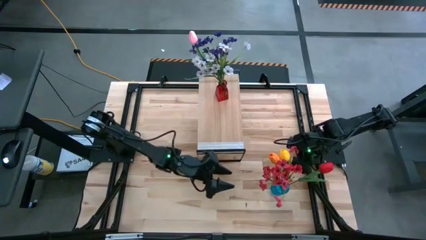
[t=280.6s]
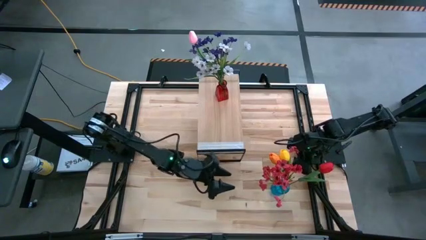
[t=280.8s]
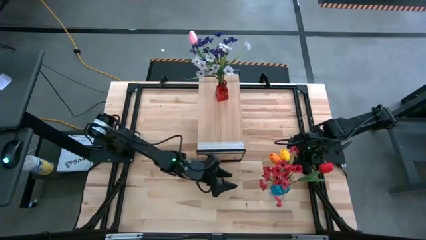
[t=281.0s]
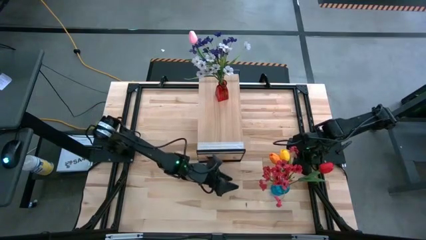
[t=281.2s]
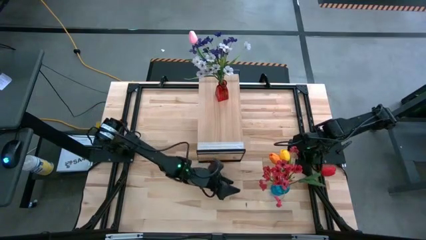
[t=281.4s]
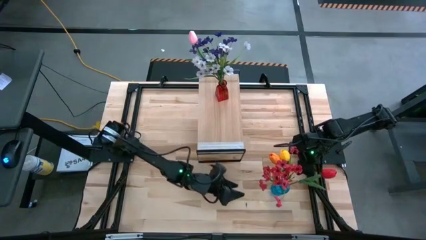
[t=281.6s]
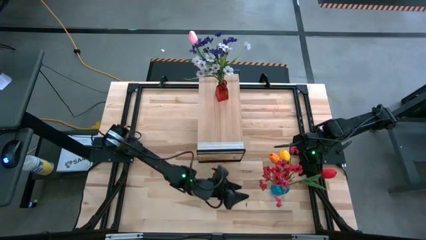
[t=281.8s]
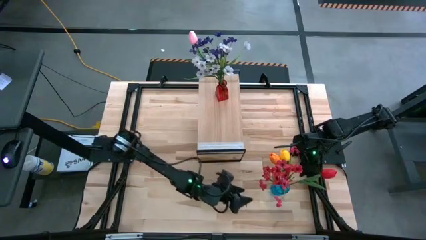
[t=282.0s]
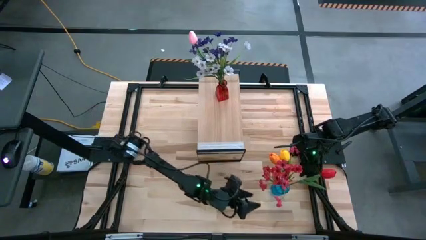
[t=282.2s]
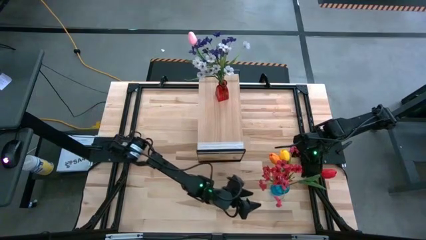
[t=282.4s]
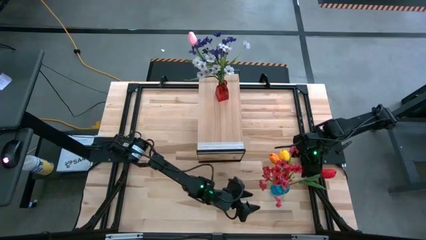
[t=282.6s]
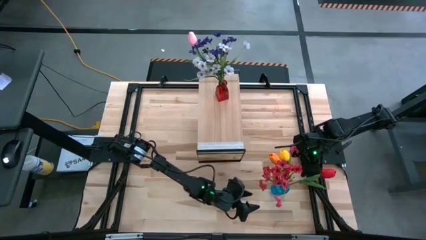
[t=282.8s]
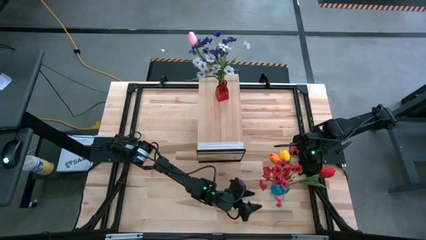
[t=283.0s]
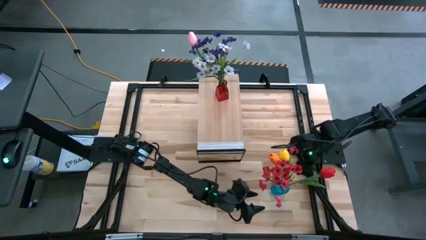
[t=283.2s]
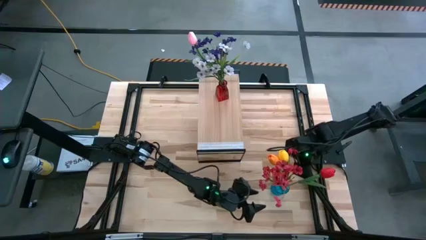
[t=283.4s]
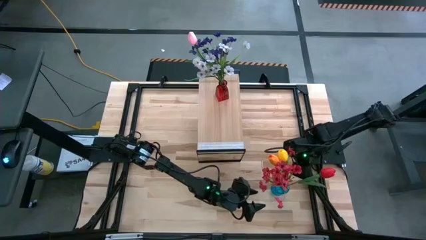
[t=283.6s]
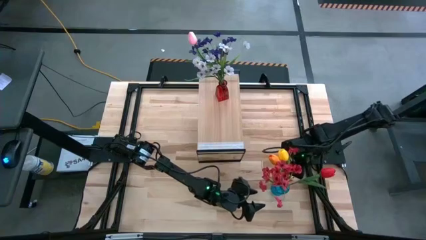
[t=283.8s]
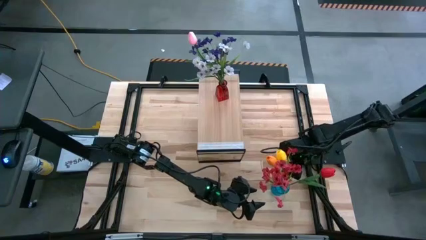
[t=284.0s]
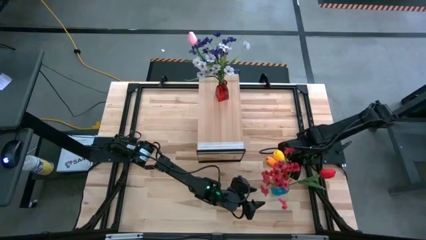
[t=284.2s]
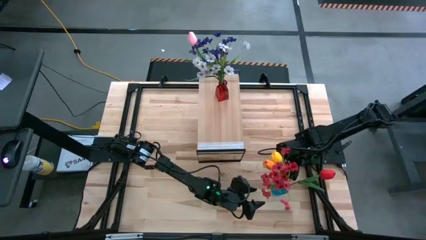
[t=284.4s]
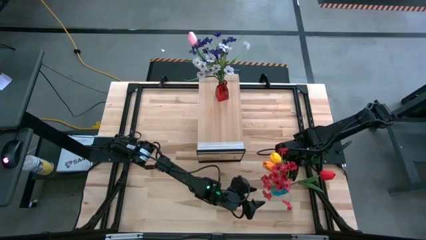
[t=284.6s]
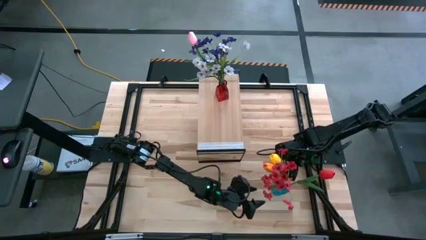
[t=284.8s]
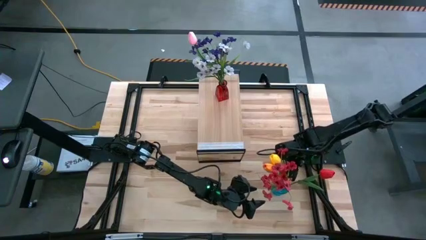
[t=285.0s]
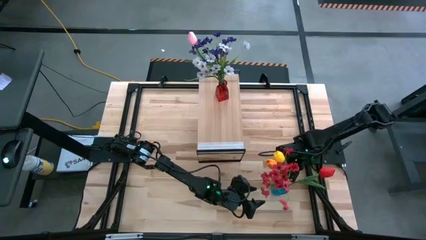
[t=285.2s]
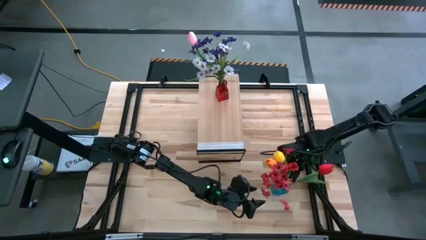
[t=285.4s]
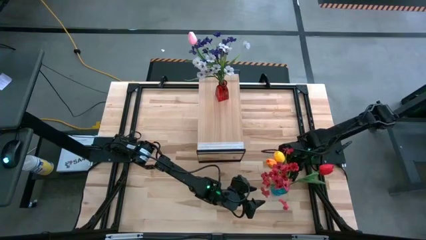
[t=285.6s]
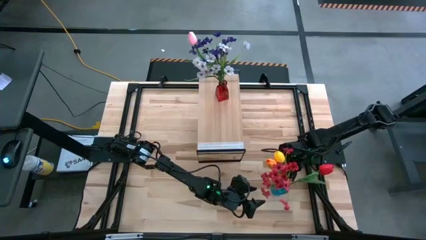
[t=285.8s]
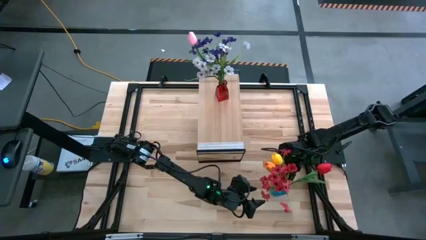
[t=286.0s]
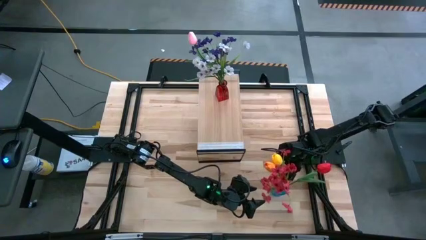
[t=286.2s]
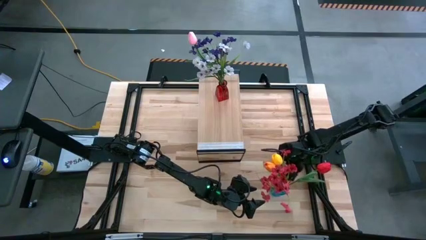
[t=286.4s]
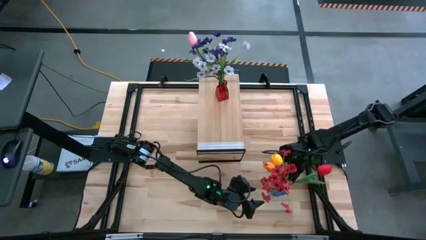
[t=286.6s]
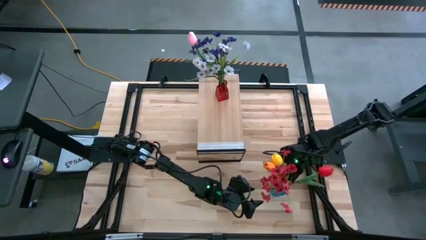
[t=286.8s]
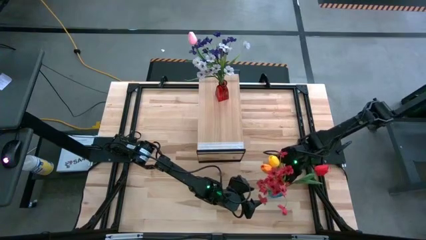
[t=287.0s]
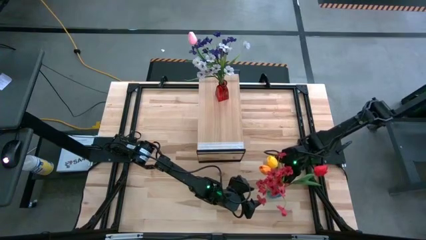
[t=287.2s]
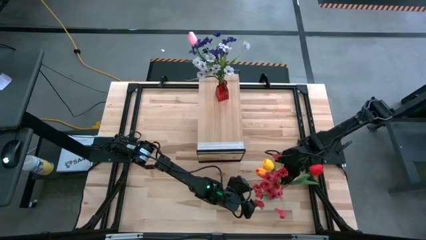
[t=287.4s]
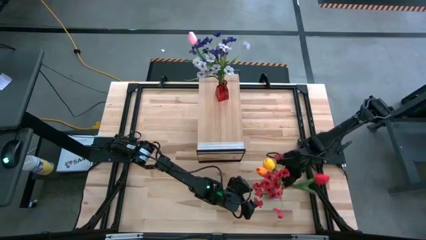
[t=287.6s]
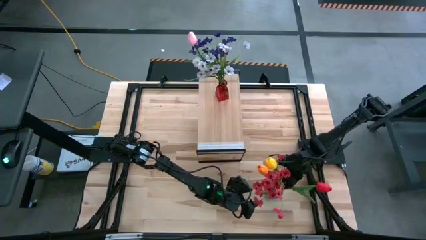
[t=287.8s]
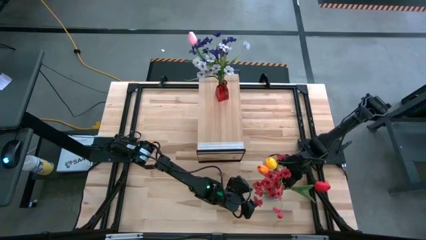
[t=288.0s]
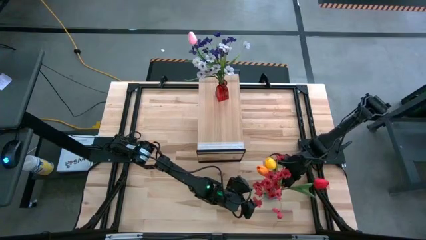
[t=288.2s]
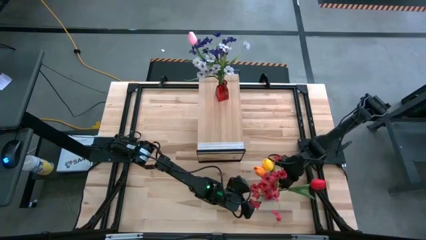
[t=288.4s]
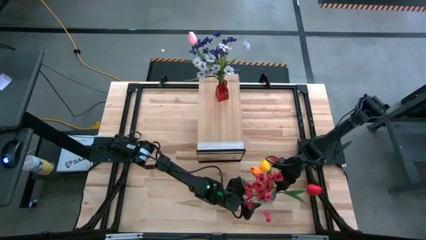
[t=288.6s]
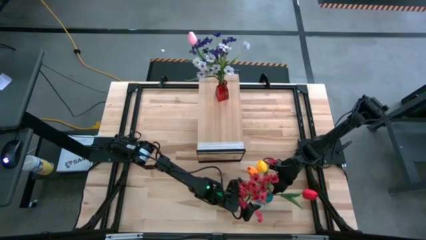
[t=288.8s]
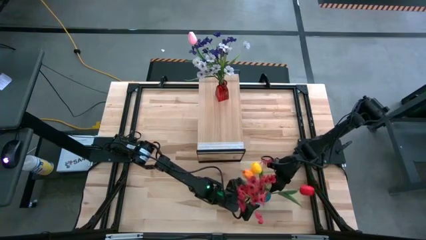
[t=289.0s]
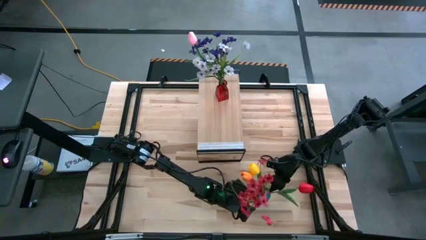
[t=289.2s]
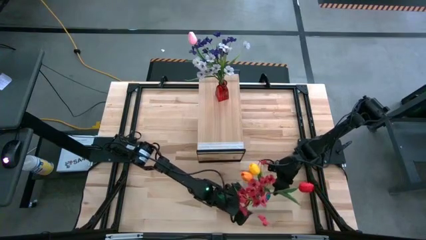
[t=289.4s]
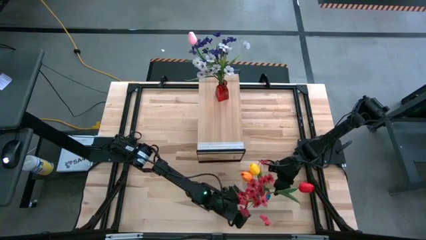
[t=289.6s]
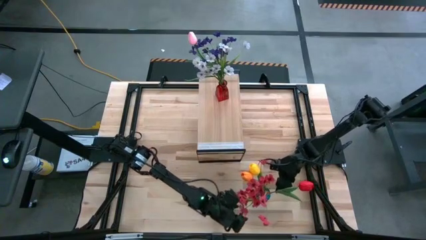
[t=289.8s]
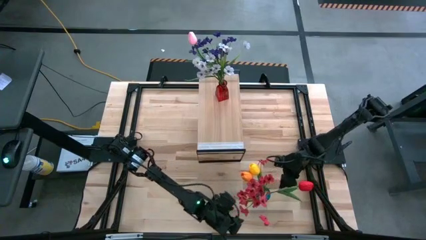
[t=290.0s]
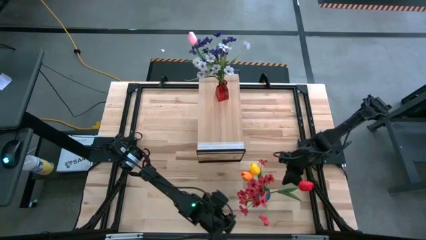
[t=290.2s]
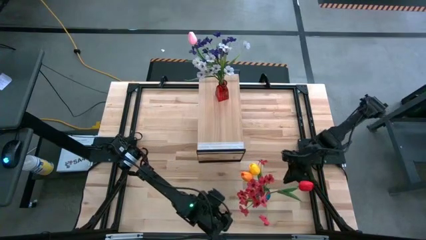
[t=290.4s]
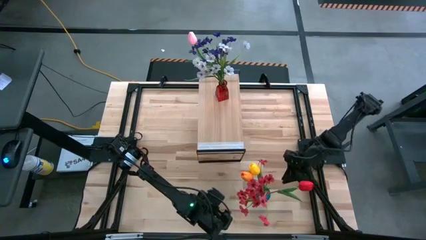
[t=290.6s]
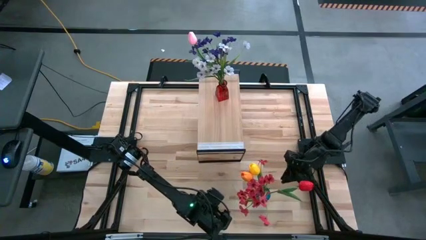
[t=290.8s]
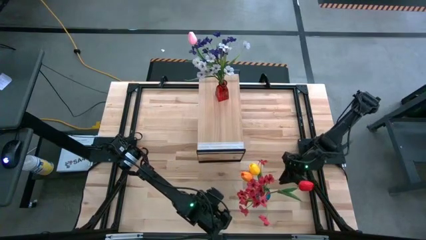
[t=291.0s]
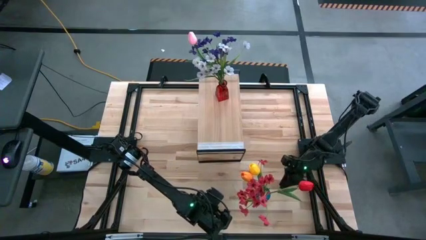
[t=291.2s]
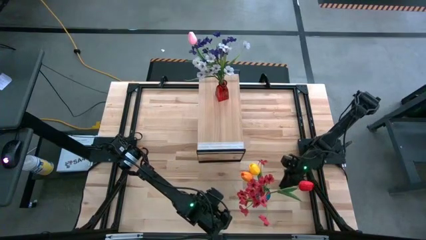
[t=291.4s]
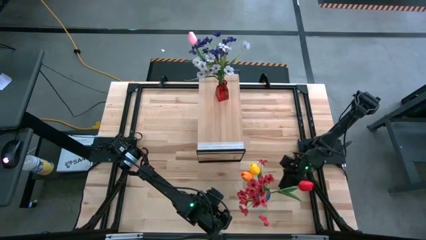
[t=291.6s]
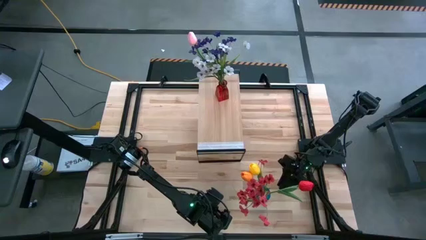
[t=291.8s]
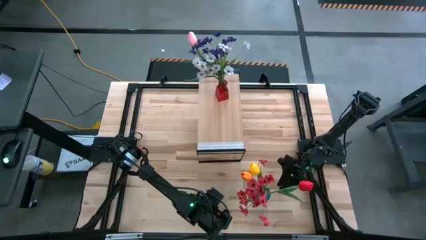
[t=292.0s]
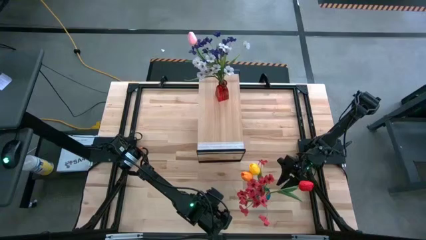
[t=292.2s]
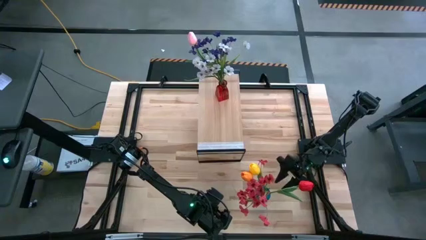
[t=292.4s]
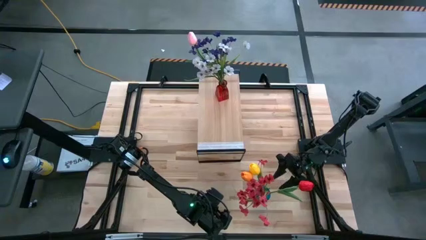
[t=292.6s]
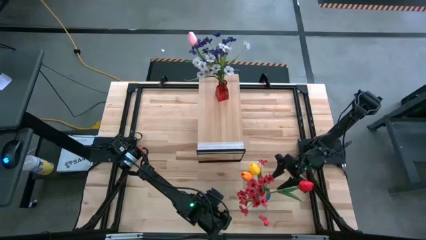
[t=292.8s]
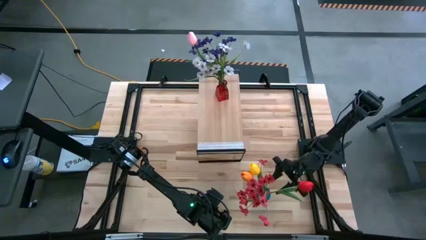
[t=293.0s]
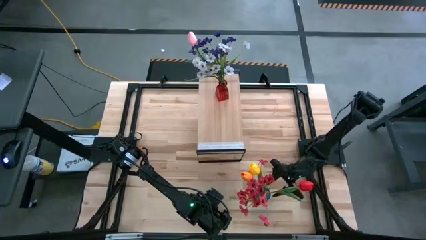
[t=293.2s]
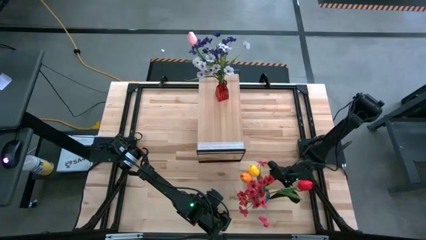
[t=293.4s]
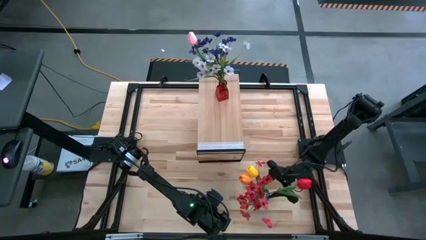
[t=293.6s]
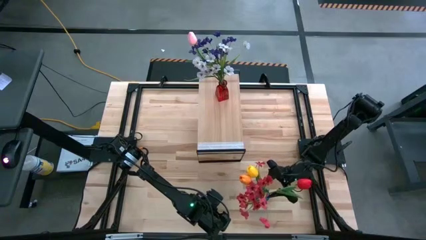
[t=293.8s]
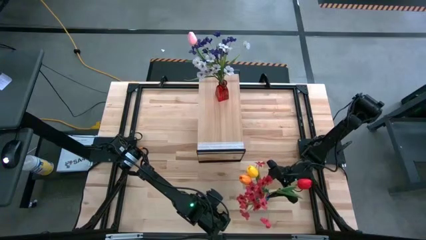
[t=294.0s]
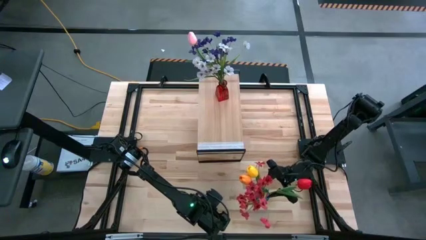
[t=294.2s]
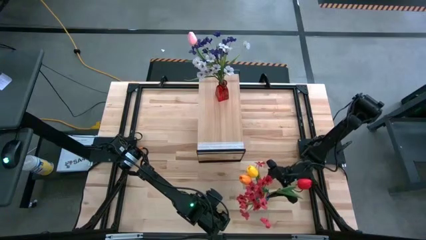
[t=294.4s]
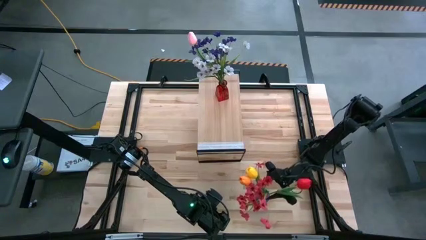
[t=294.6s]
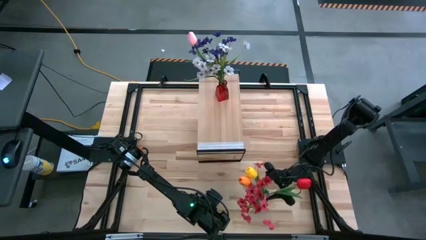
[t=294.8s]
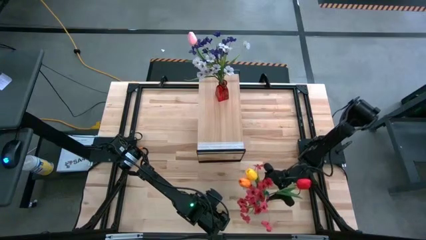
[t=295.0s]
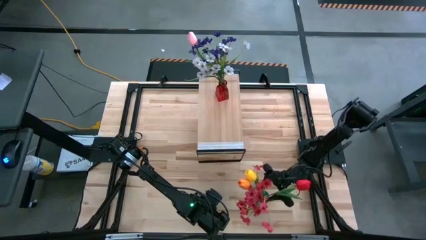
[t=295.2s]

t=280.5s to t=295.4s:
Task: Pick and place flowers into a vace then onto a shelf
Put the blue vase with flowers on the shelf
